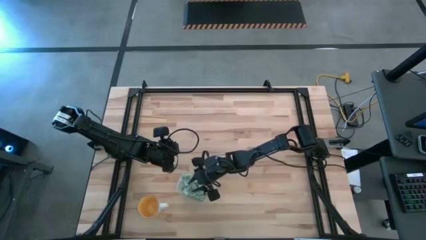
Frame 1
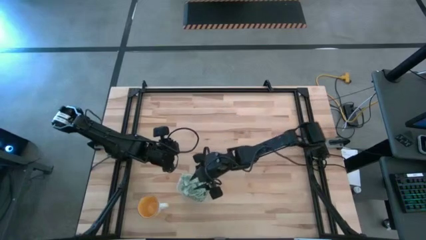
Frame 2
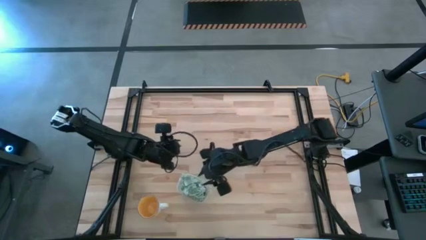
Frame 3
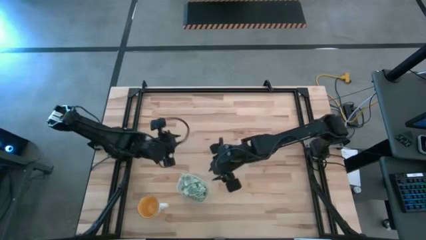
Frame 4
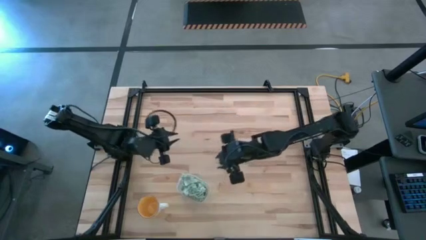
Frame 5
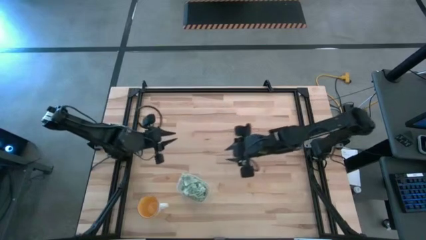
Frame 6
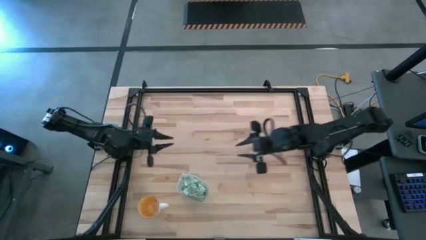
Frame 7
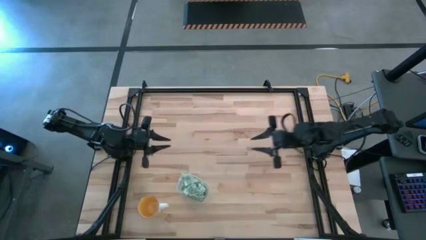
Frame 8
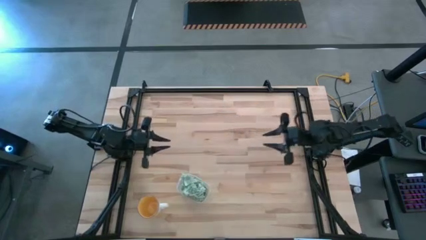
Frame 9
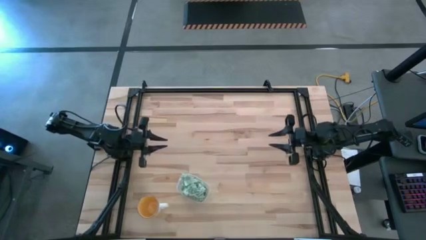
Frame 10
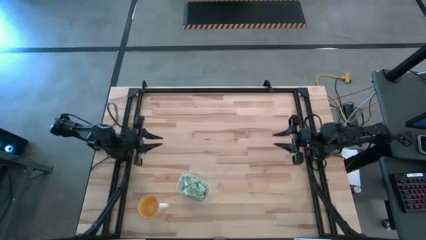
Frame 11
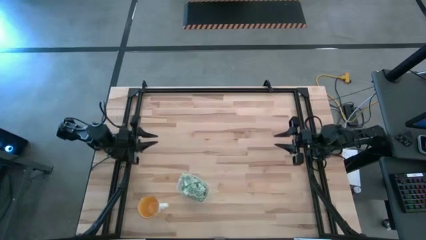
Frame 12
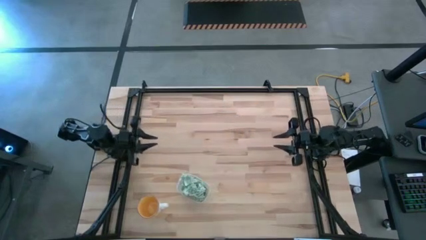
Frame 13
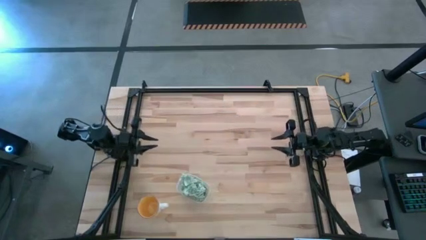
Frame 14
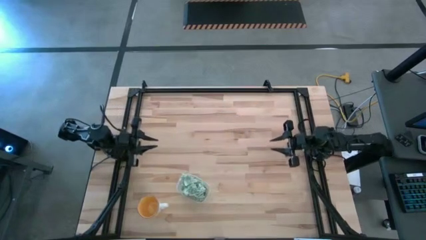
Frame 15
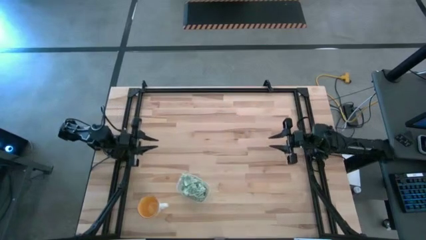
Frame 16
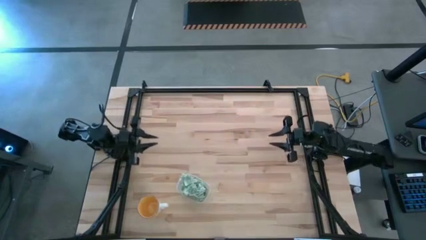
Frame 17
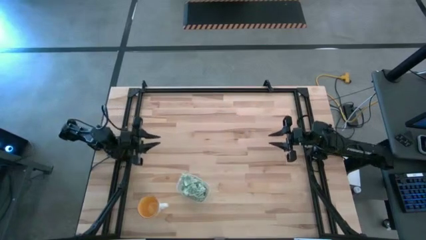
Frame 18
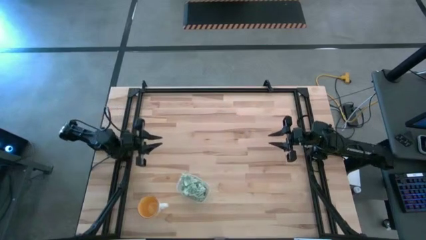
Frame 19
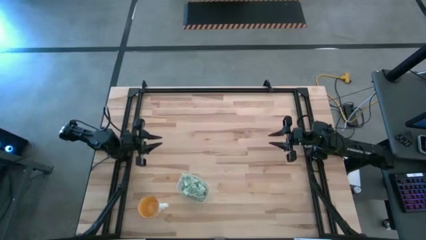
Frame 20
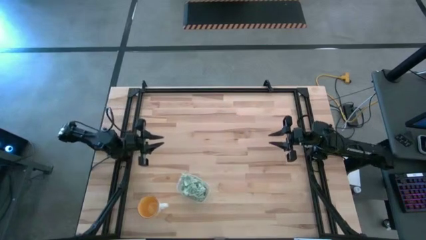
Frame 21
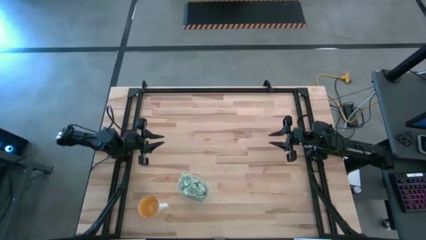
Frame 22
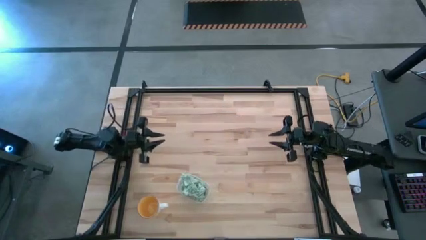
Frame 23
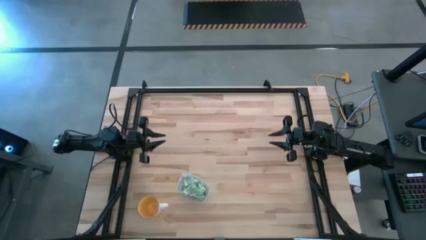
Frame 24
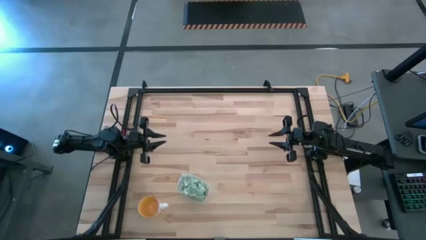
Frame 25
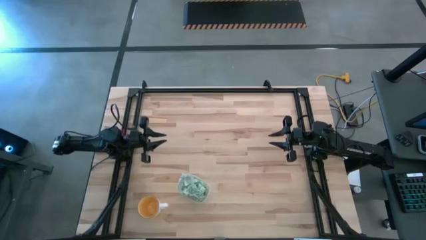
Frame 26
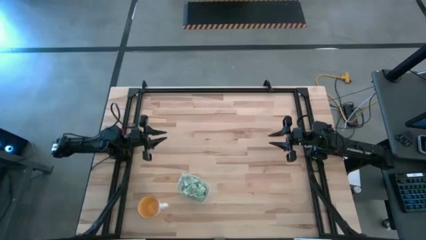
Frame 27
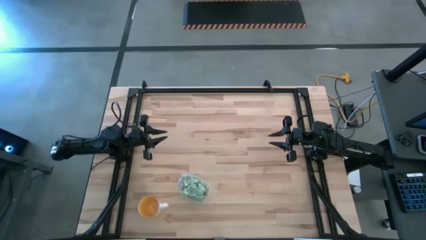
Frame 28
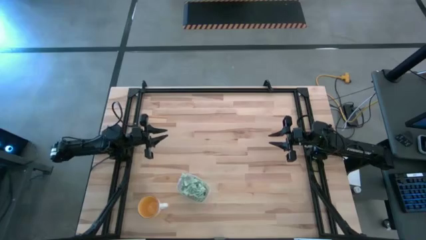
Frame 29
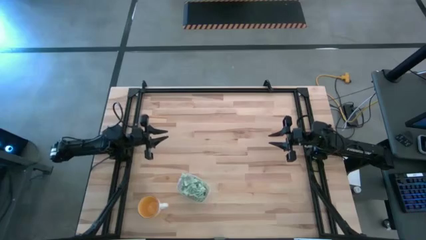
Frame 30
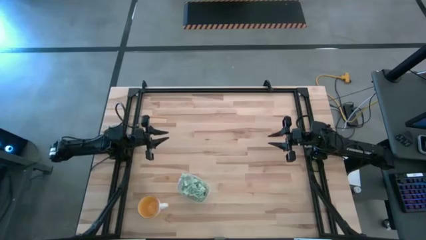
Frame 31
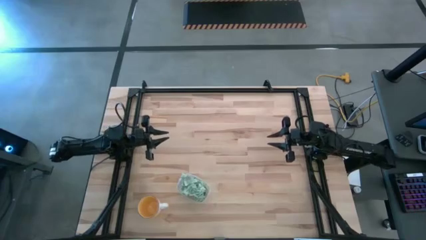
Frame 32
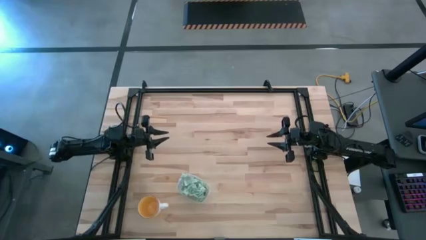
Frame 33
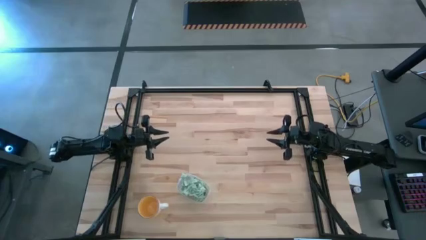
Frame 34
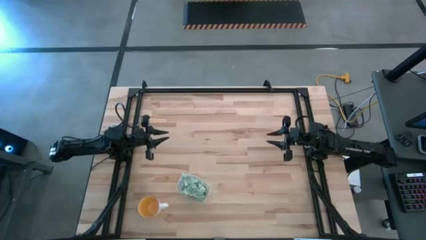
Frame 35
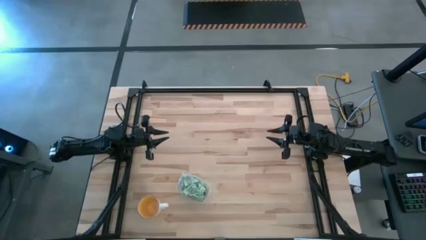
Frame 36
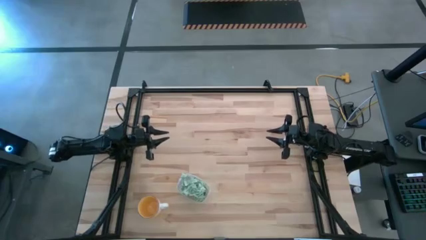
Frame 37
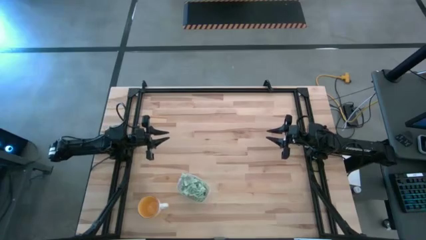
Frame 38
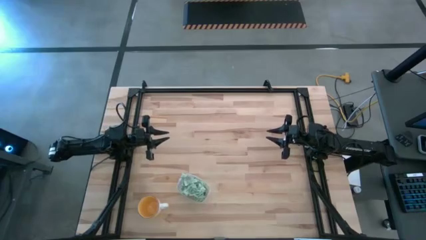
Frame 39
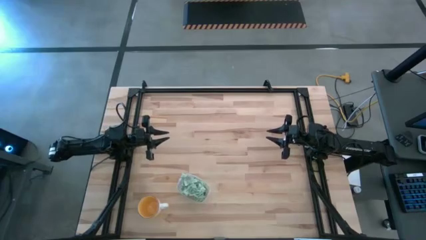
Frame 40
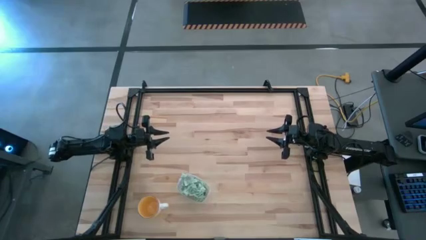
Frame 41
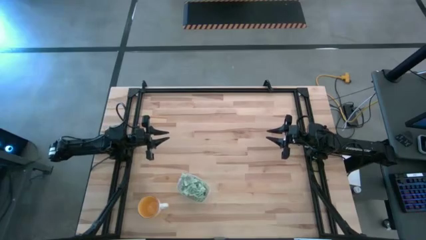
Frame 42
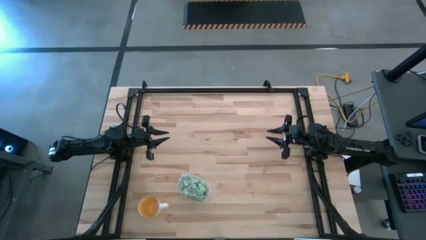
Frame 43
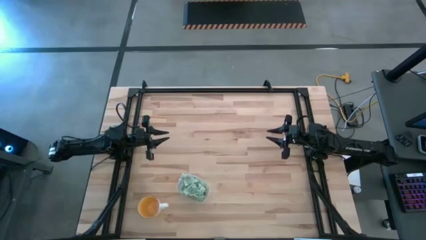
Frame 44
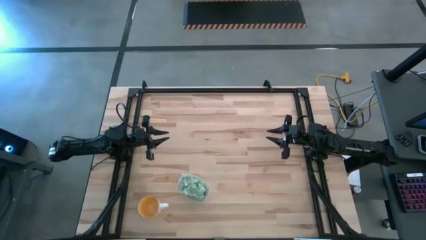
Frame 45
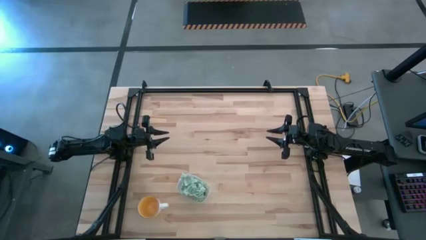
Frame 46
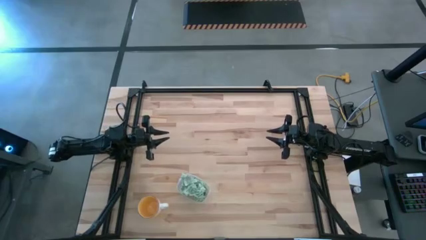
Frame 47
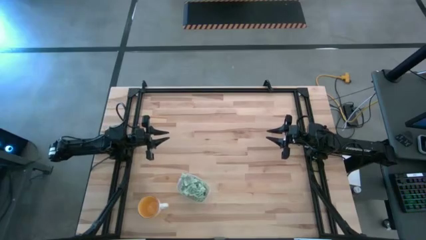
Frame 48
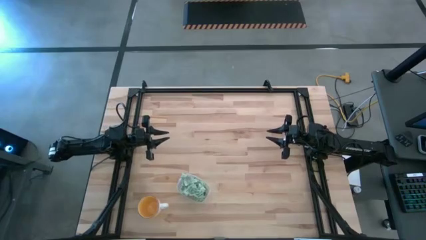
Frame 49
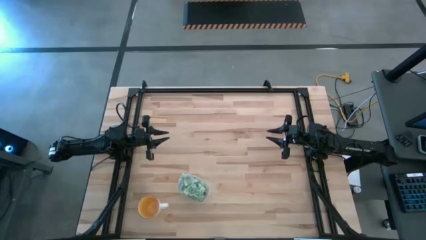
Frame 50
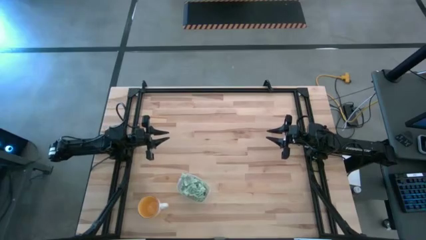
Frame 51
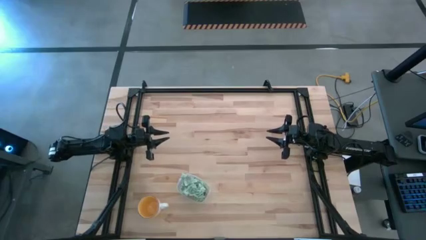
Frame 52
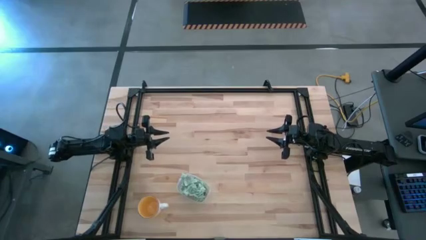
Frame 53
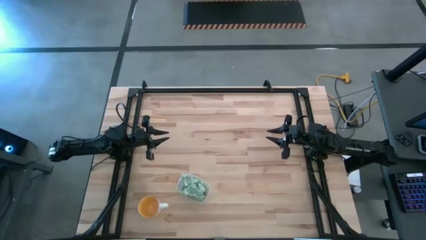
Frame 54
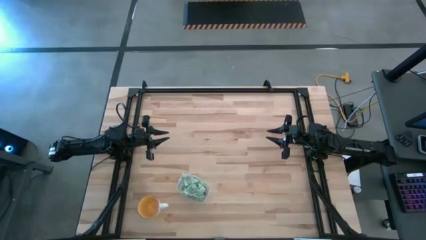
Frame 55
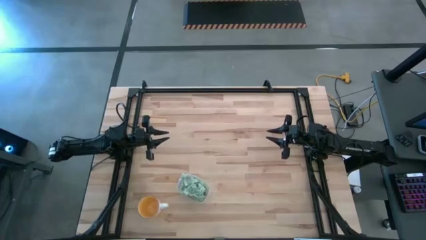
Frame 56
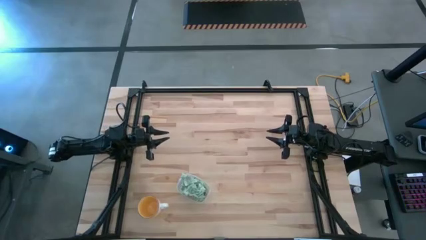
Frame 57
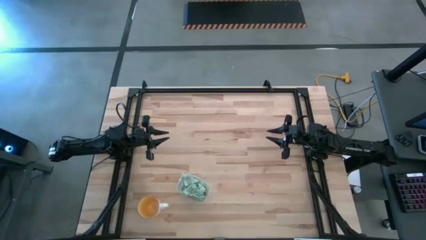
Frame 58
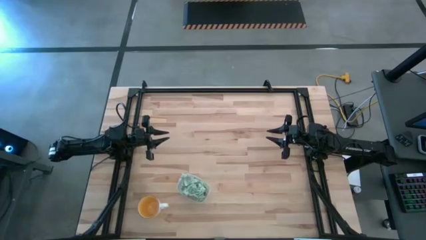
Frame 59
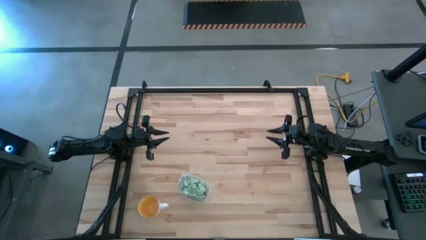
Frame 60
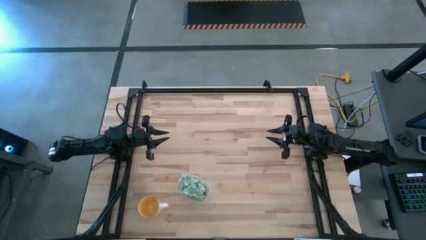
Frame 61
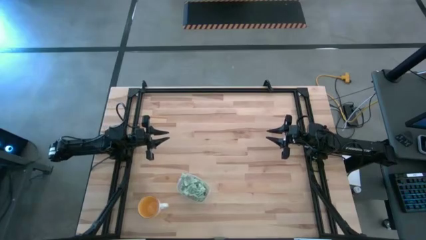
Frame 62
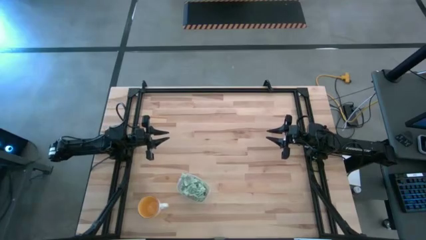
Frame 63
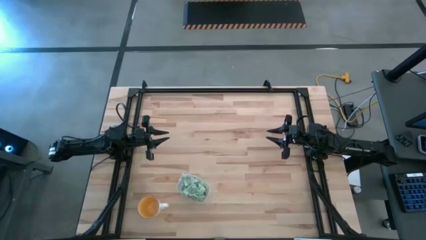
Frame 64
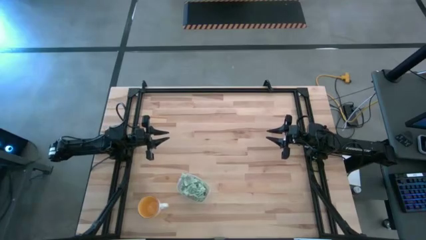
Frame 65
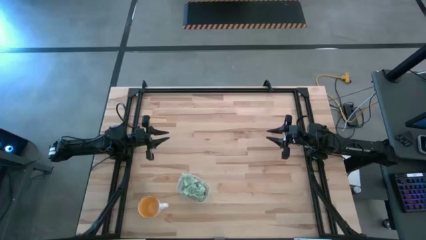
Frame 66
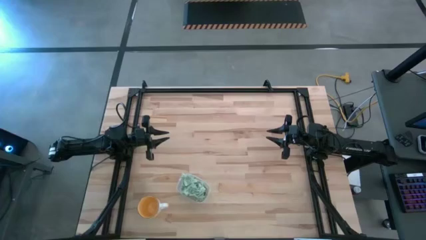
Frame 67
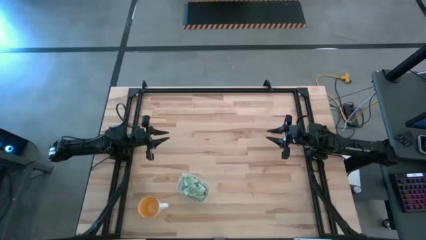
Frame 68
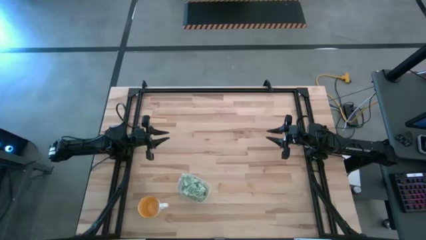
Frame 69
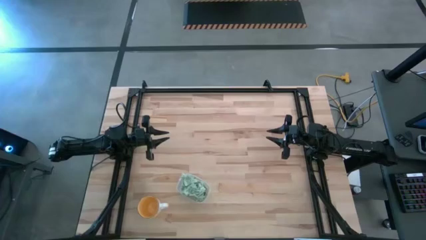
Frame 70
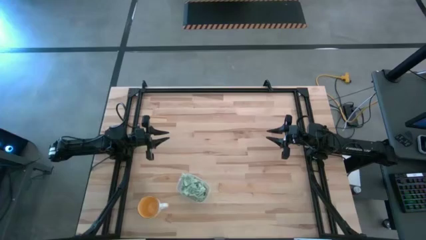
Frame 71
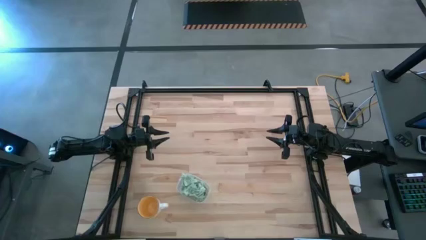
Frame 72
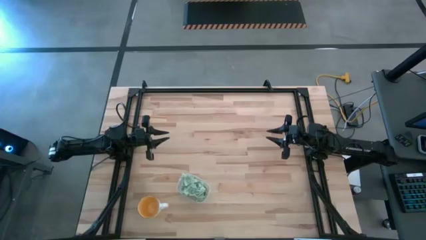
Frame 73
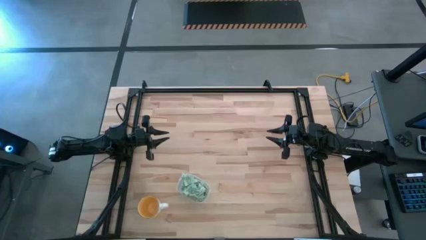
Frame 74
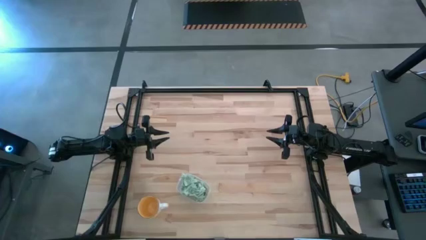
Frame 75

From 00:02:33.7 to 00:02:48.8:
Task: Pick and place Stevia / Truvia into bins
Return to home position

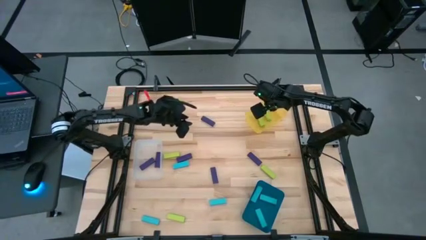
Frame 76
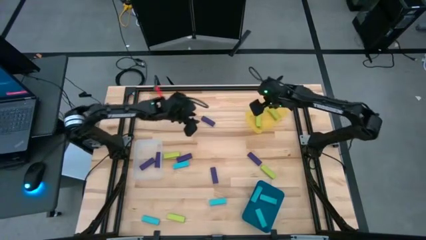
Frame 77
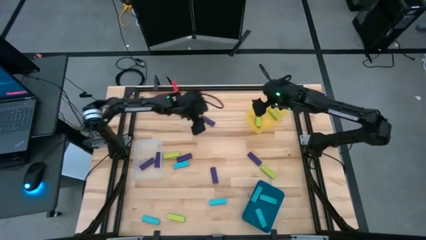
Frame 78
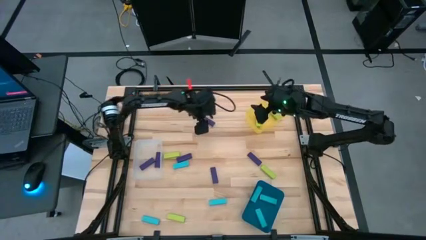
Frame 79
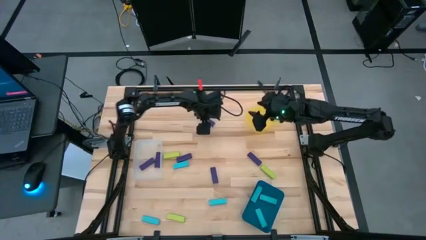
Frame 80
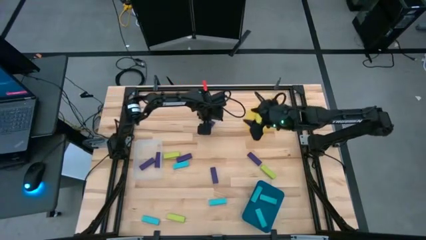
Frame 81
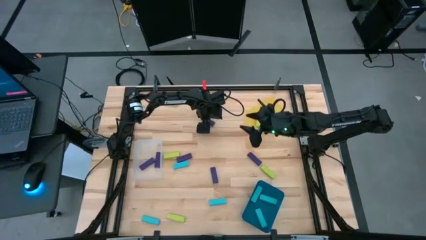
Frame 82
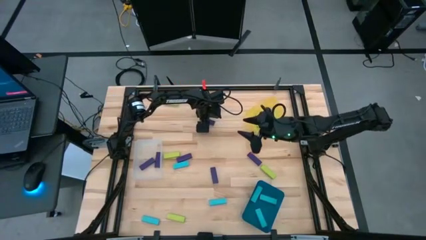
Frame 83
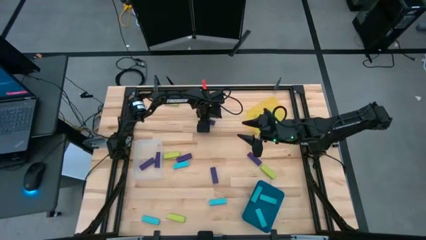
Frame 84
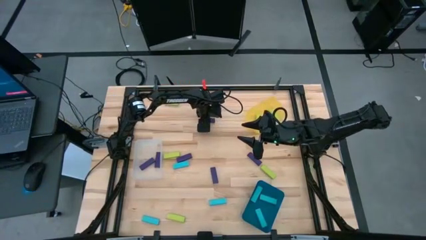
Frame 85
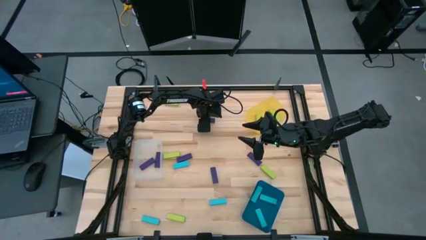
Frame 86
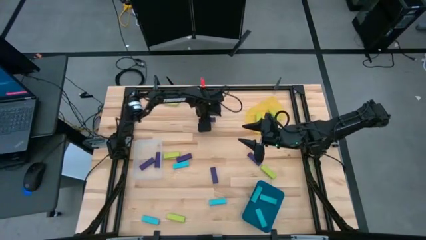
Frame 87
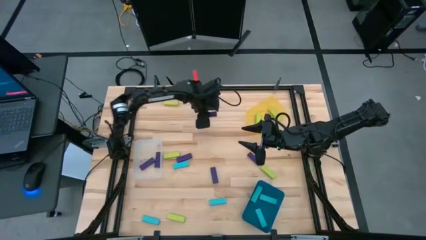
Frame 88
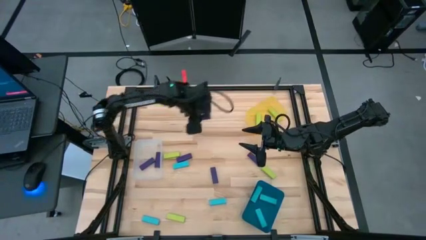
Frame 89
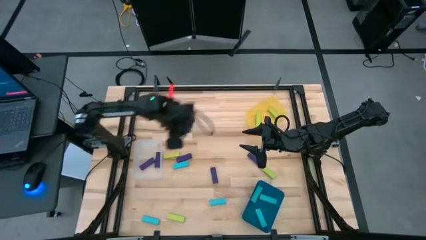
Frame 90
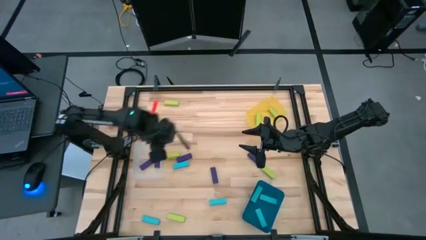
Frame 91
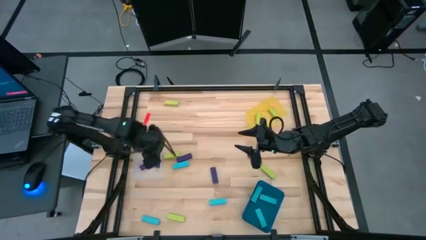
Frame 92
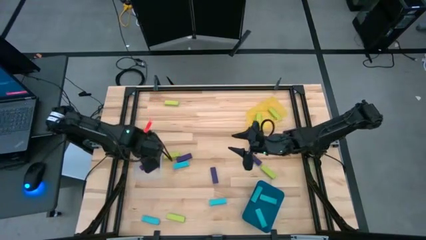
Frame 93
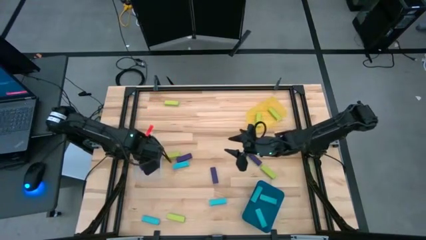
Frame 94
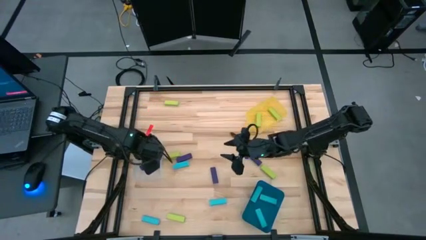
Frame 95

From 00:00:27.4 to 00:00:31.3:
Task: Sort blocks
Put the violet block into the transparent bin
